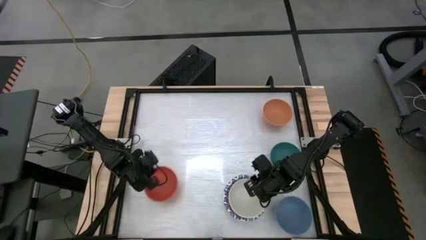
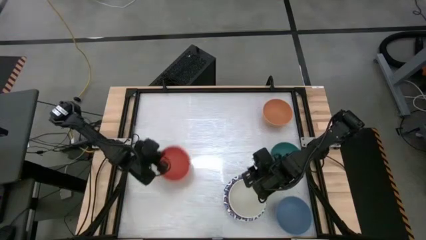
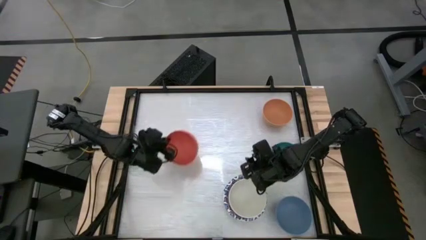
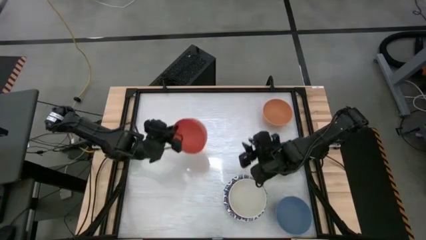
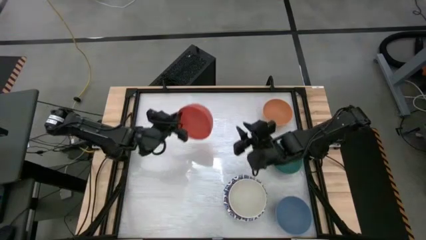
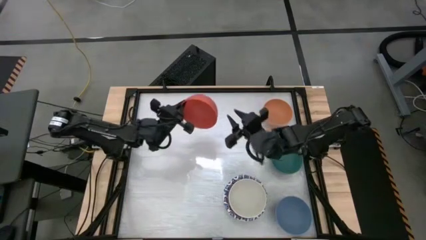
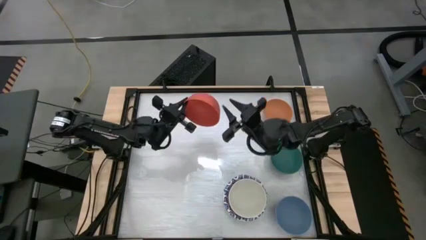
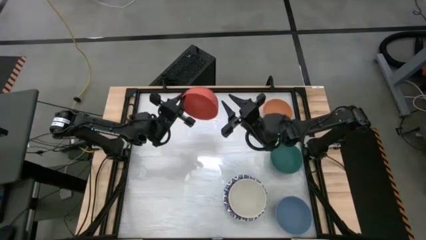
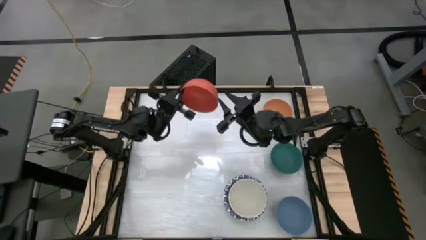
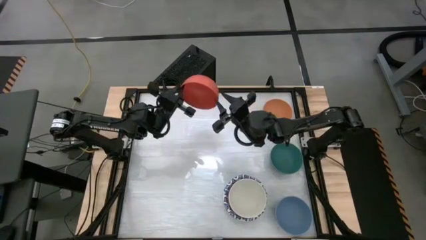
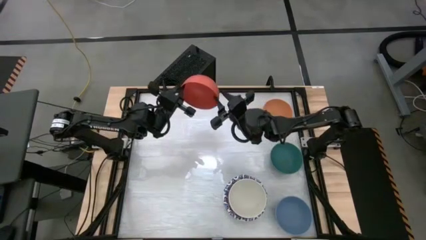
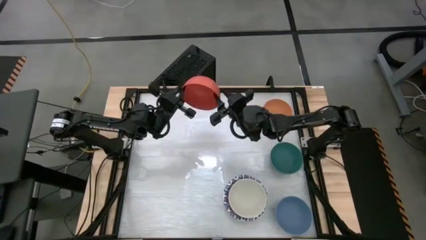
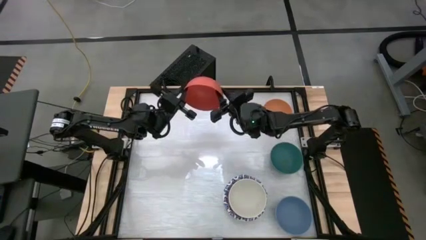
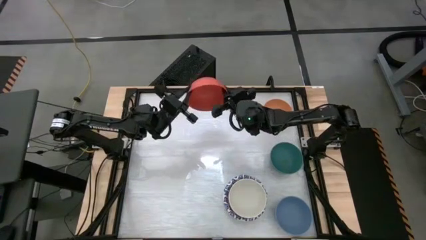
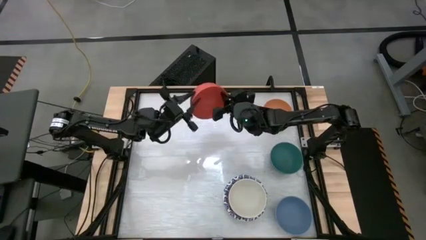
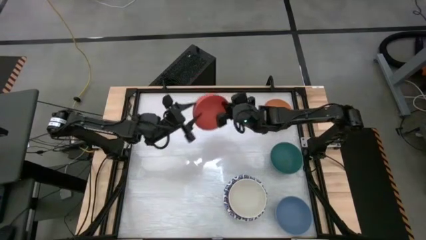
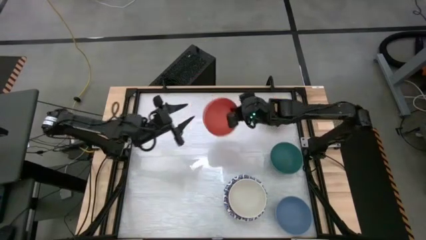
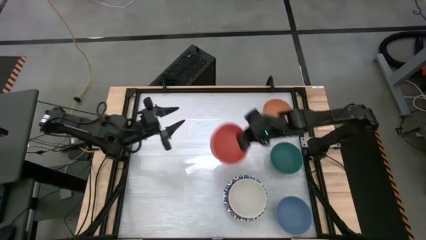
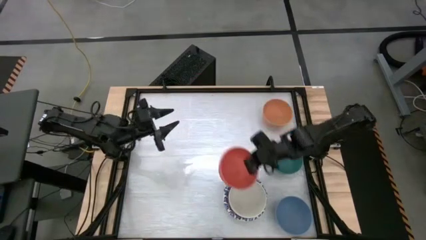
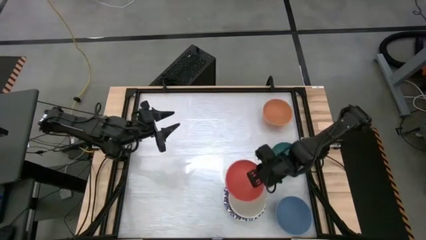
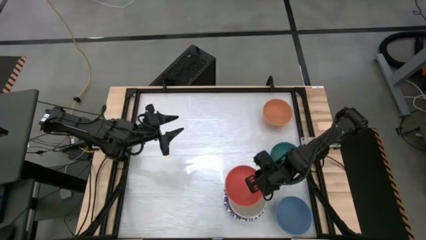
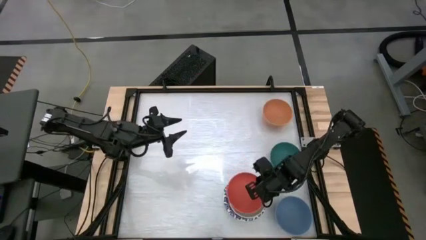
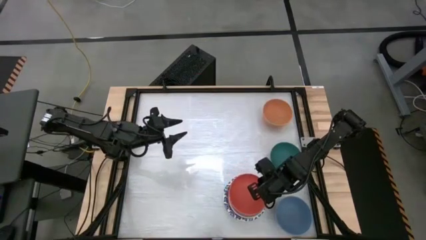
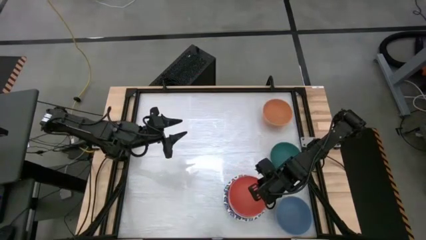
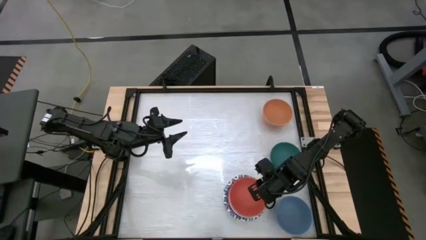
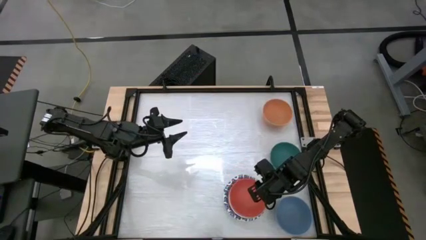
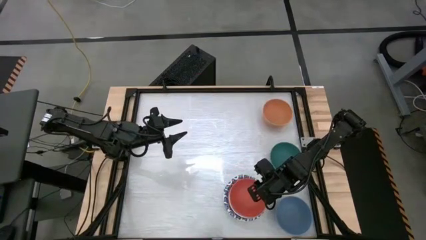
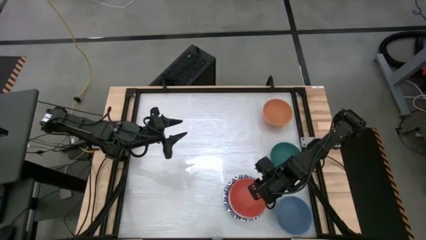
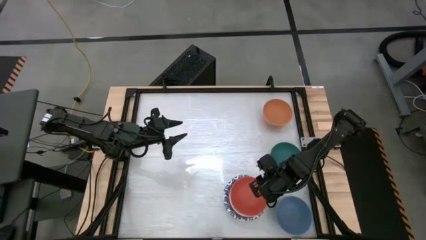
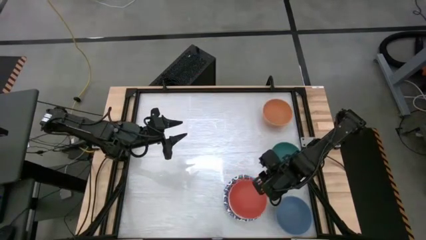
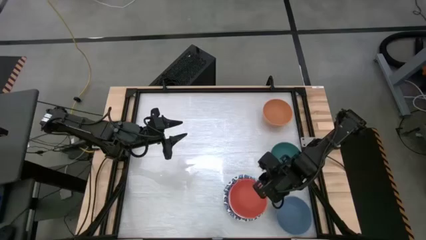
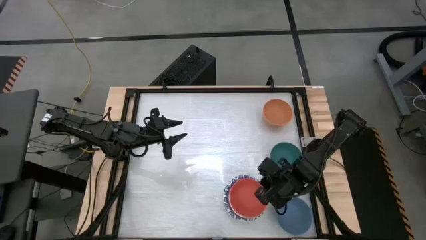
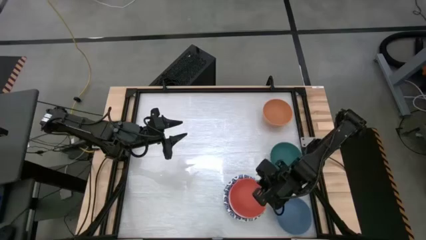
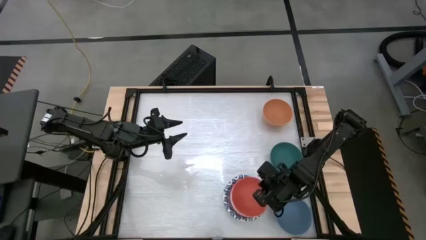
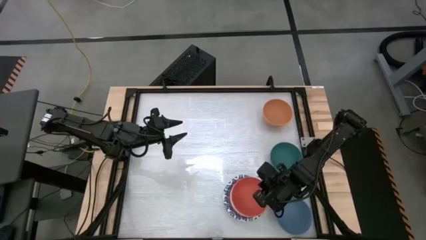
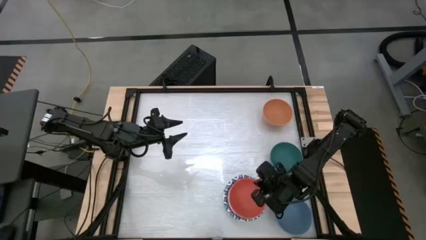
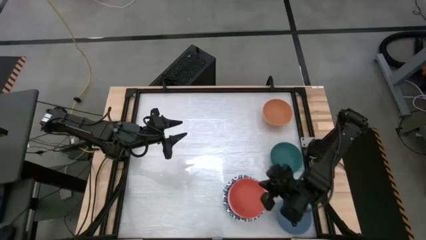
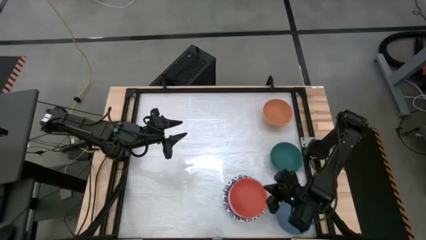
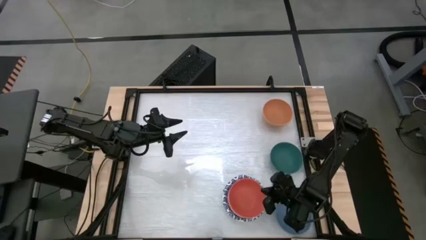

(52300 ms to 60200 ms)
Stack the orange bowl on top of the gray bowl

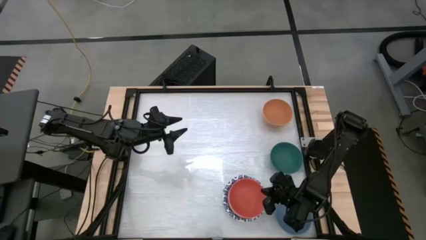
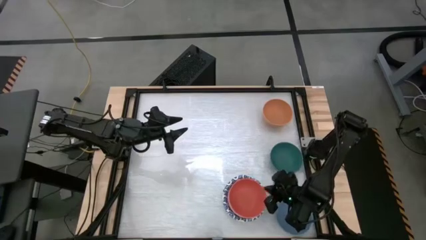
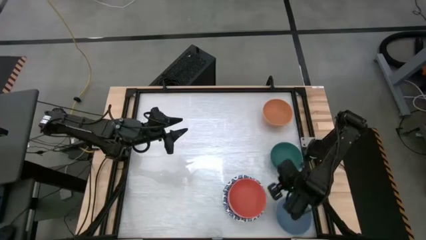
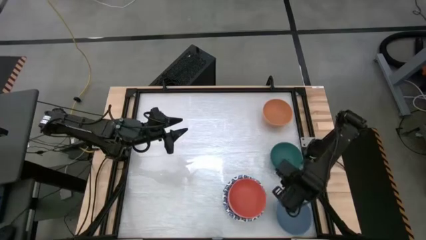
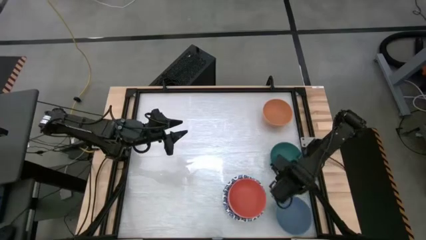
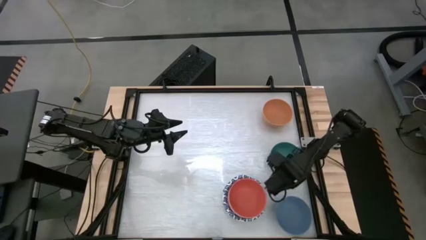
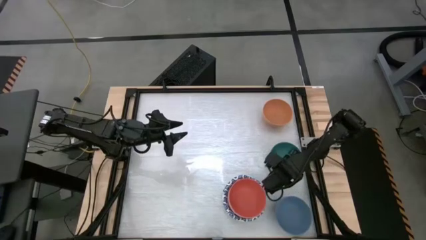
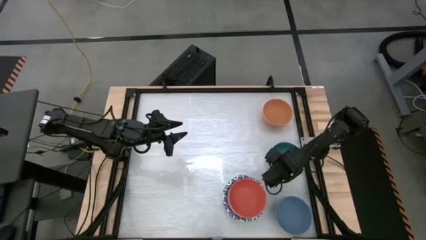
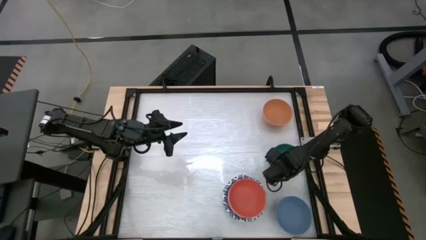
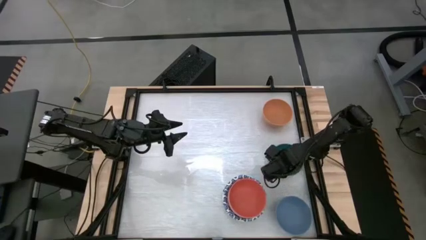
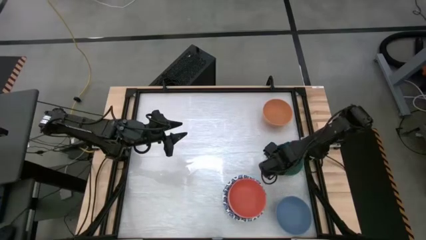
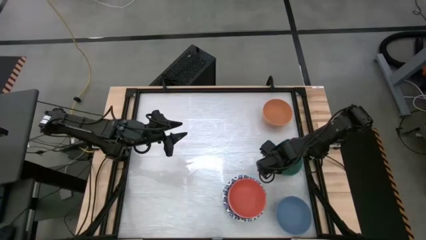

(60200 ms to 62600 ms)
Stack the green bowl on top of the orange bowl

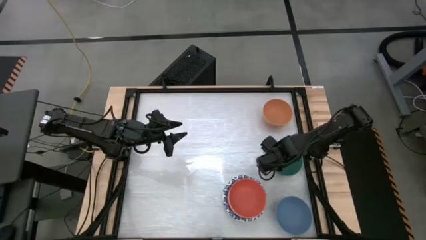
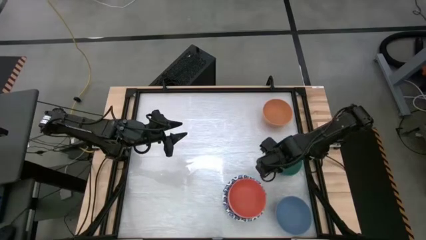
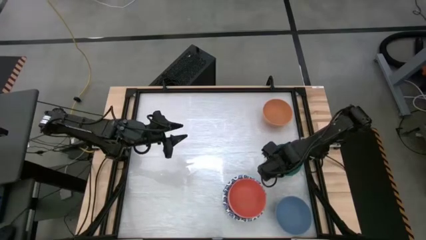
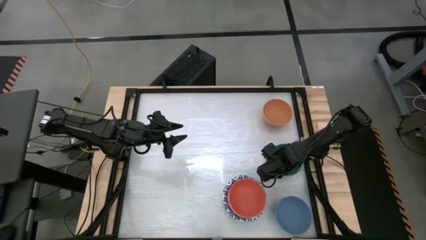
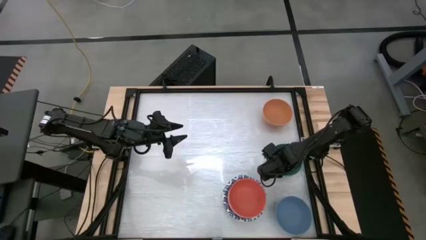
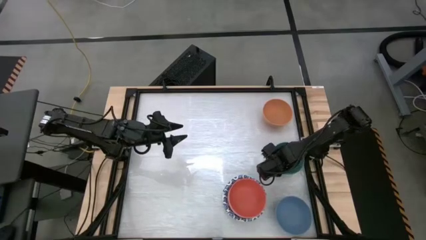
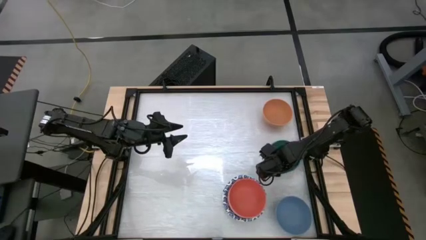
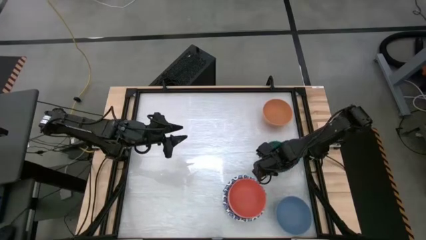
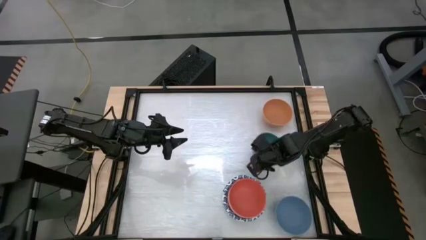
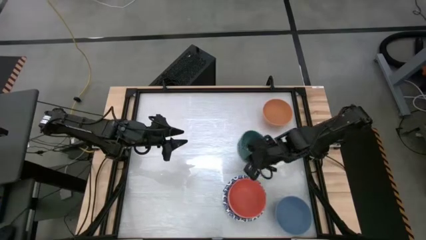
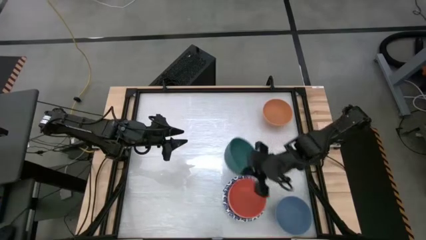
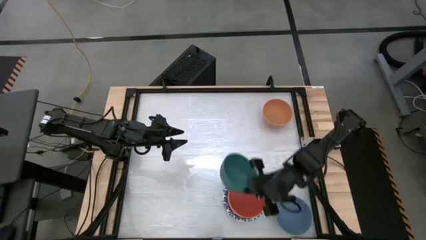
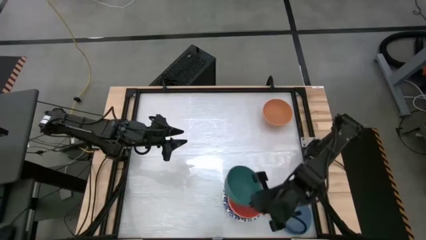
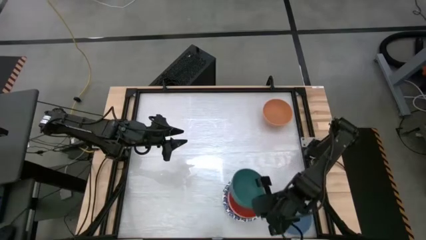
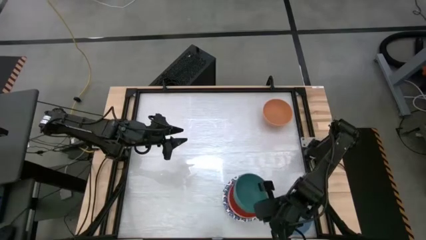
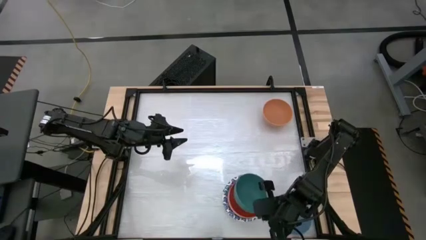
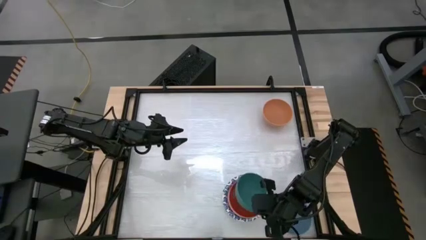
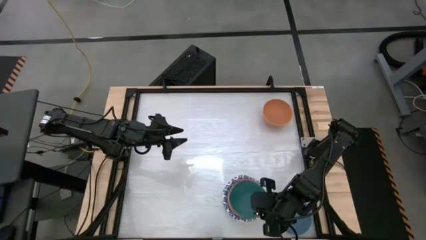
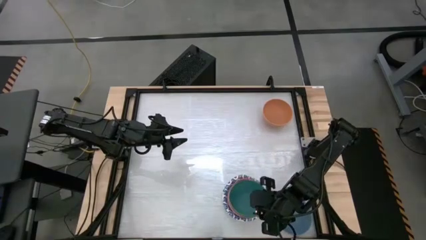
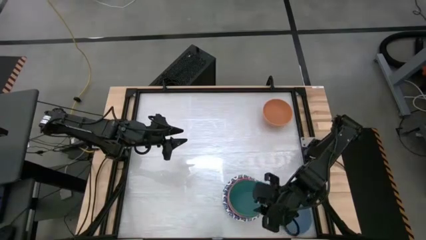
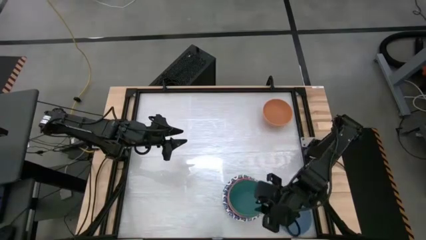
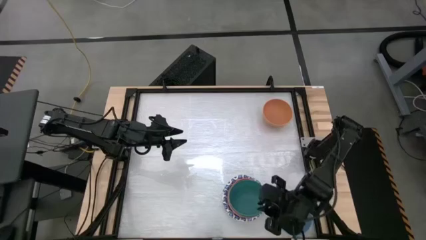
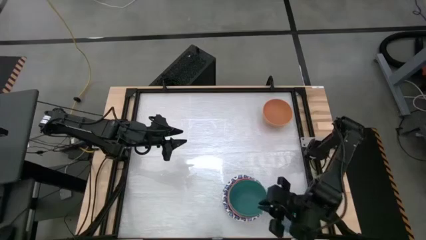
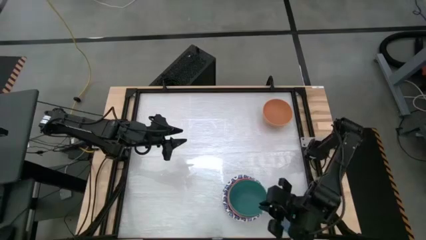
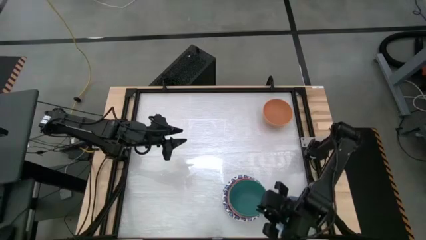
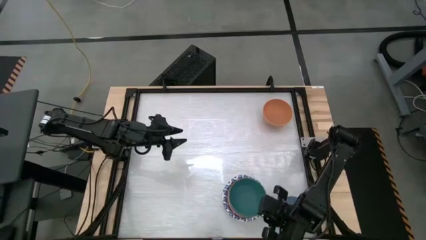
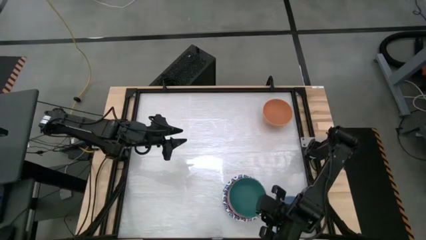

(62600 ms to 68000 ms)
Stack the green bowl on top of the orange bowl
